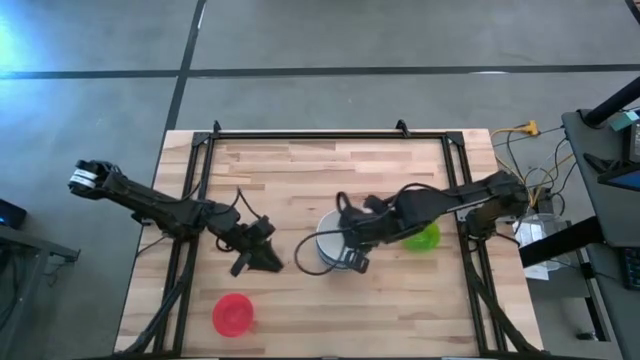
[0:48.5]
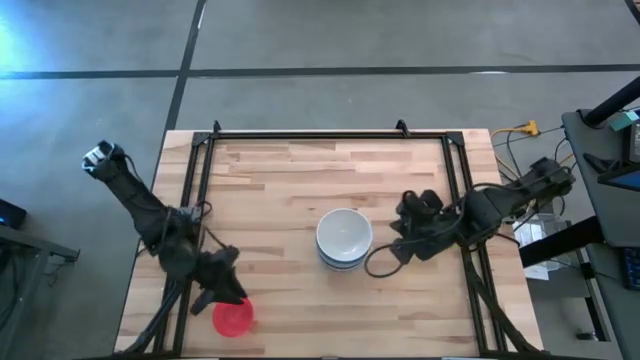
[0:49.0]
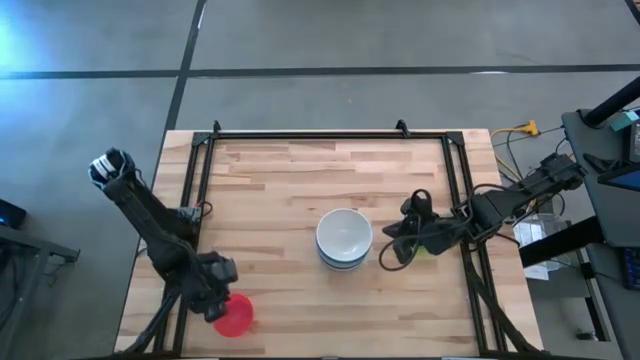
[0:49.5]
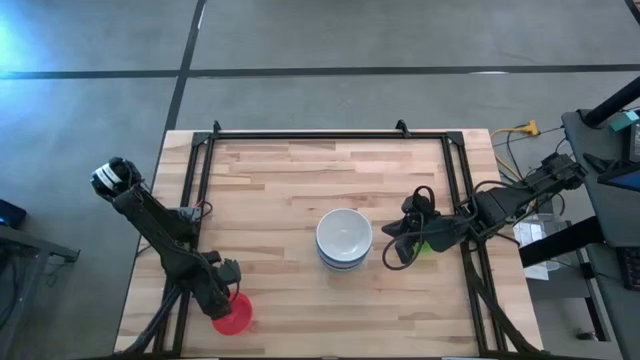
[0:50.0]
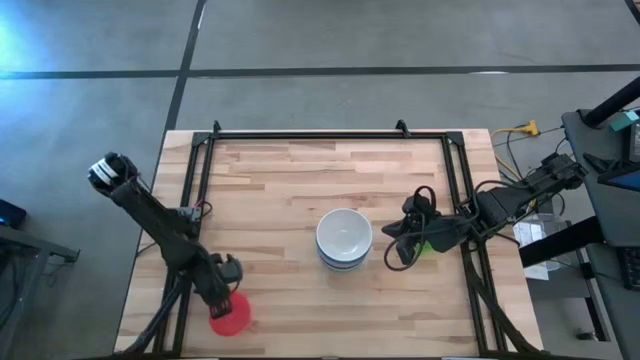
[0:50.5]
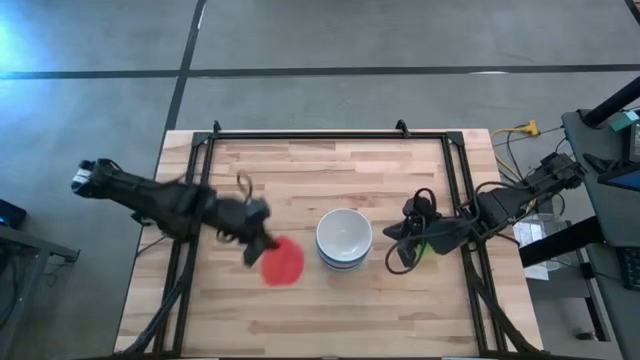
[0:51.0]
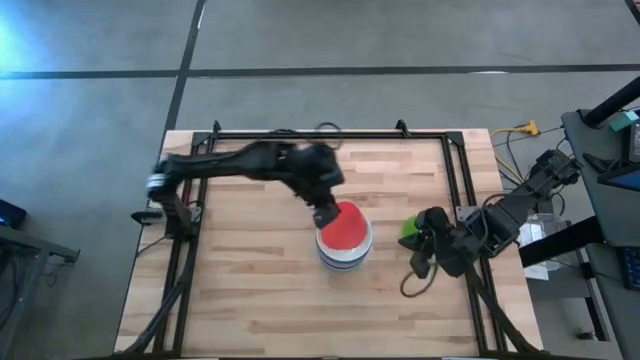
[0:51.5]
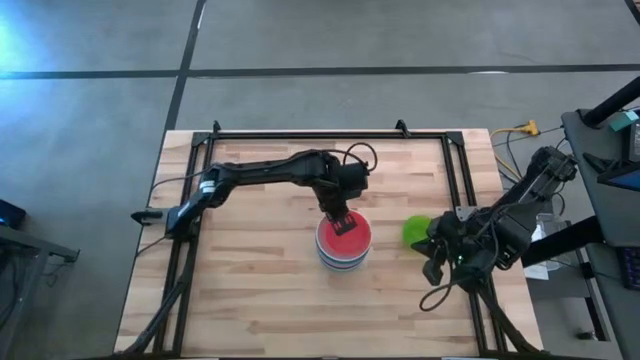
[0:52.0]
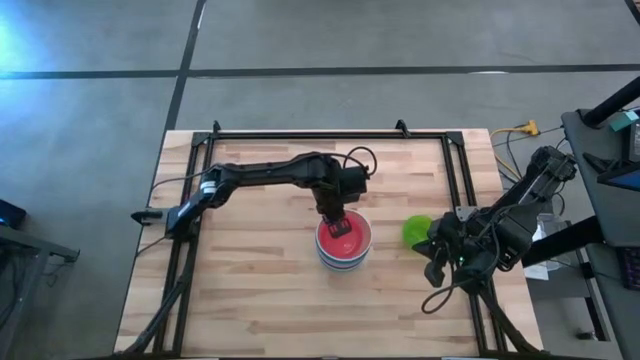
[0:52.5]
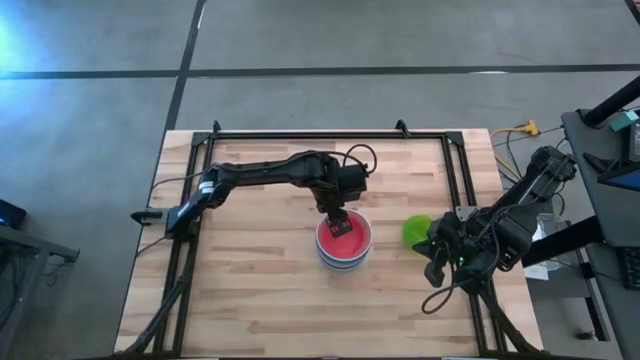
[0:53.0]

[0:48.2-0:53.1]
Task: Nest bowls inside each other
Stack the red bowl on top of the white bowl

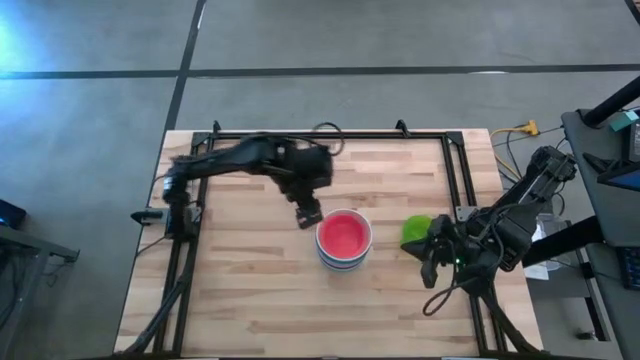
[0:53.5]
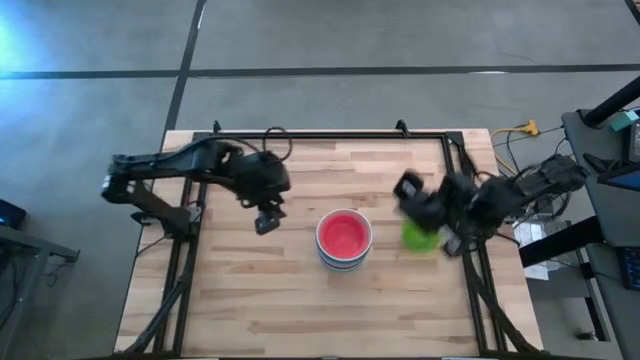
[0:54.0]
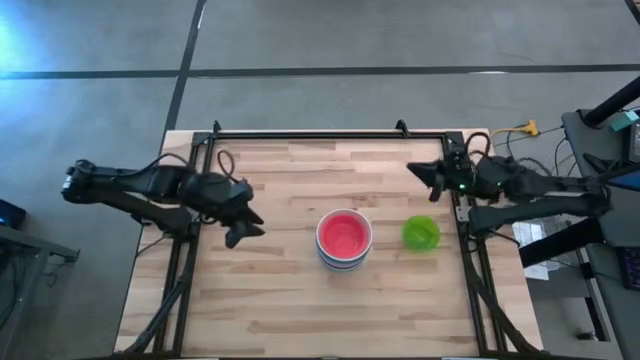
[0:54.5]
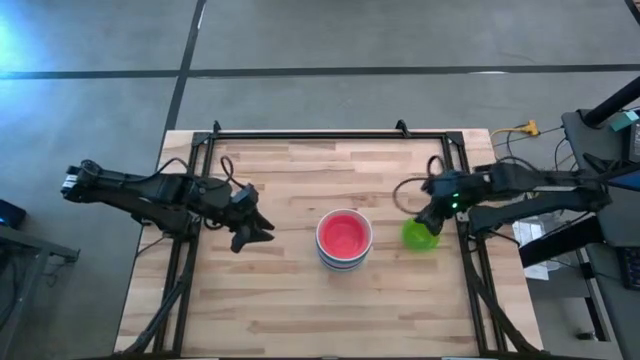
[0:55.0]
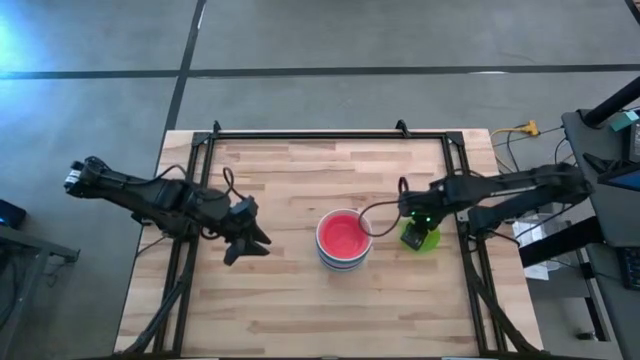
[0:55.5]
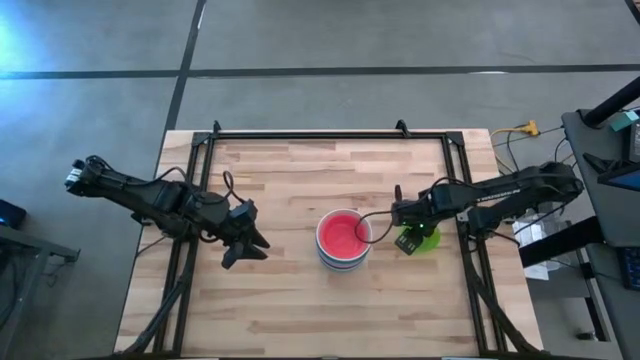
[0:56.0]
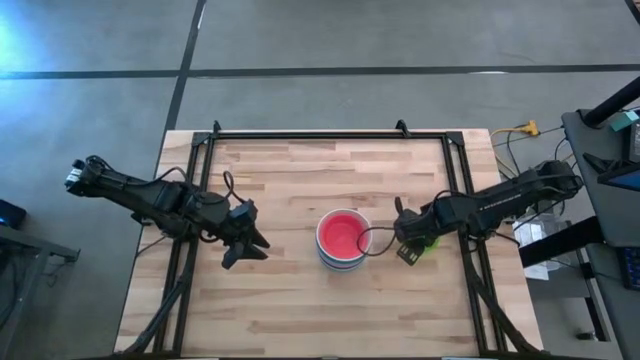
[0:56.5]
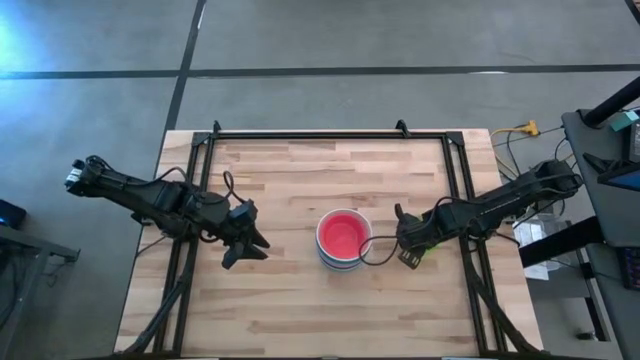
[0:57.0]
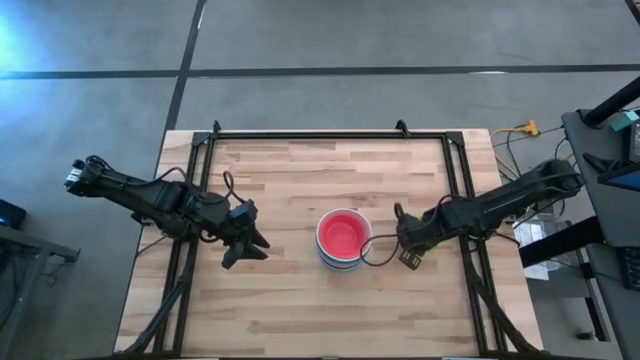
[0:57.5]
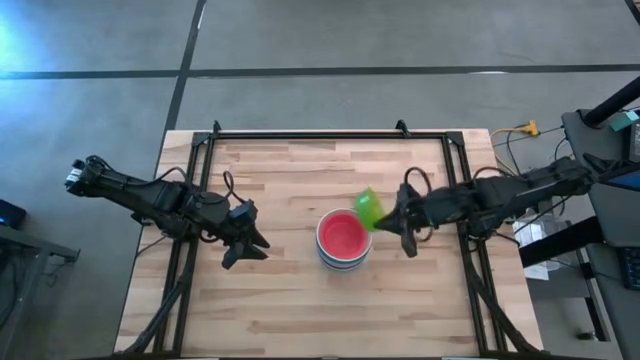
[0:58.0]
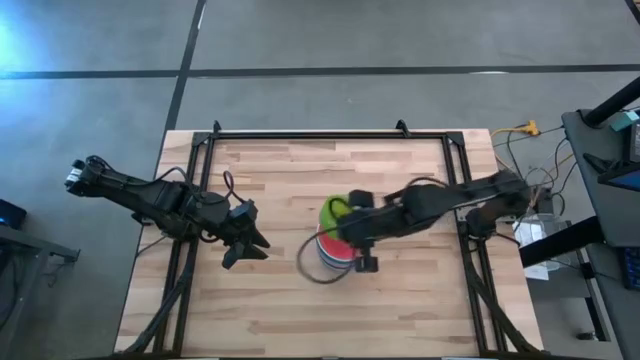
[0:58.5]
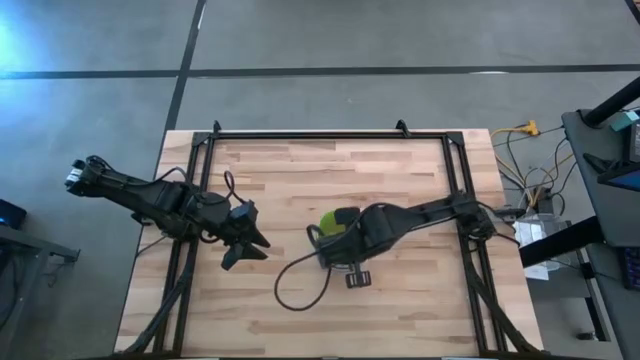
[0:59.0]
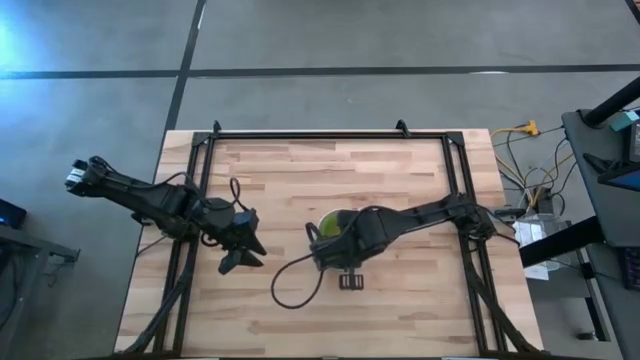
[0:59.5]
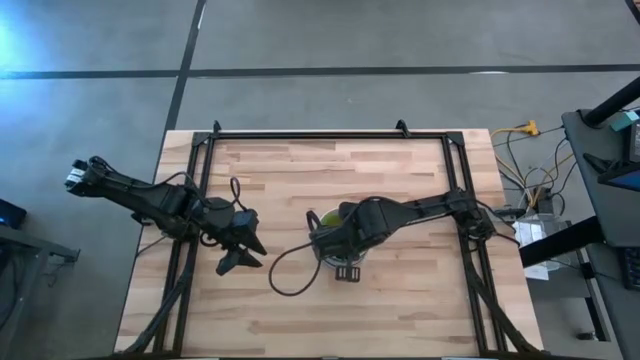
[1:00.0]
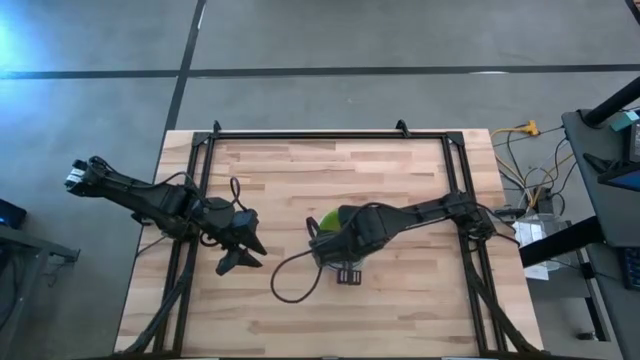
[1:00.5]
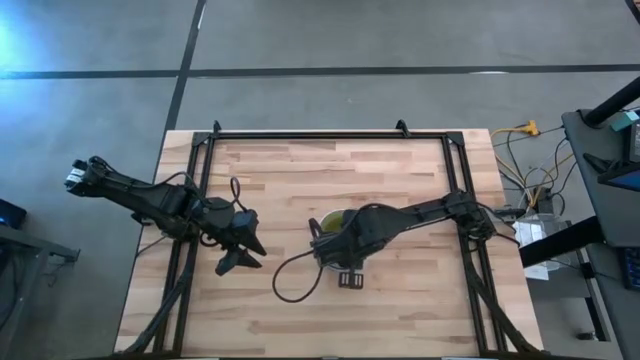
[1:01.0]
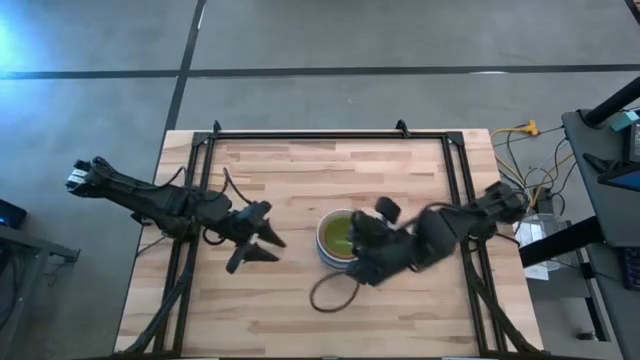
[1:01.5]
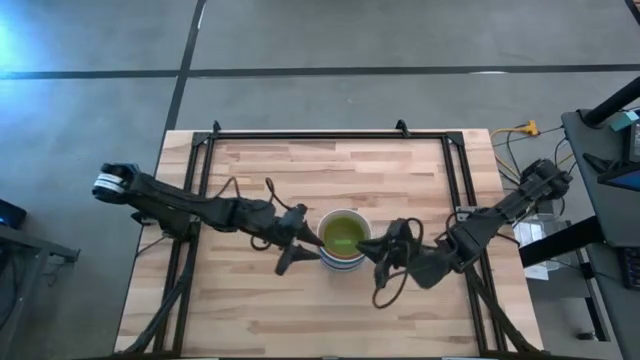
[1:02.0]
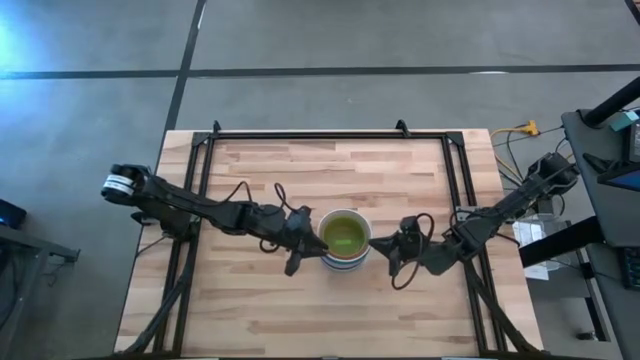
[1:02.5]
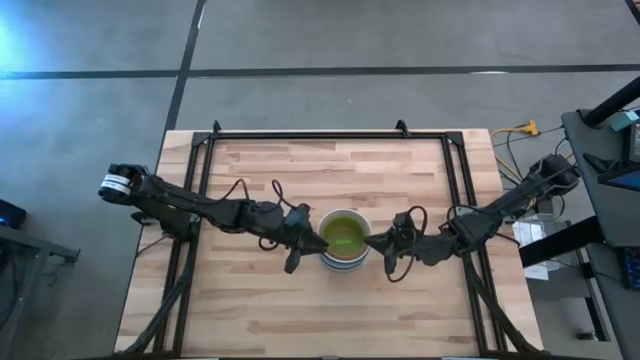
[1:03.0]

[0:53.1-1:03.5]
Stack the green bowl on top of the red bowl

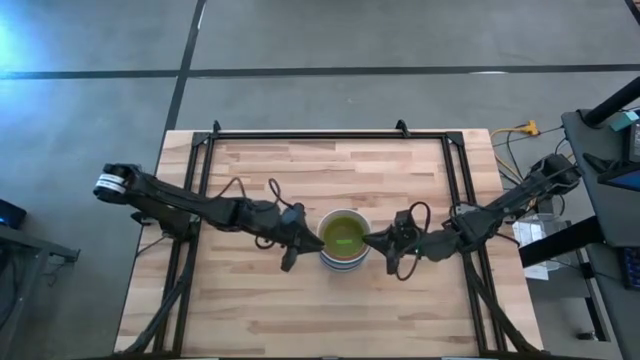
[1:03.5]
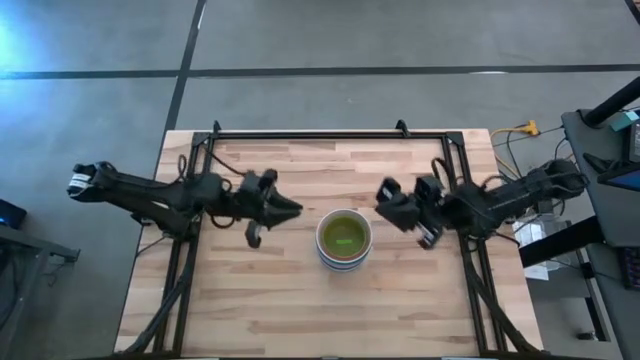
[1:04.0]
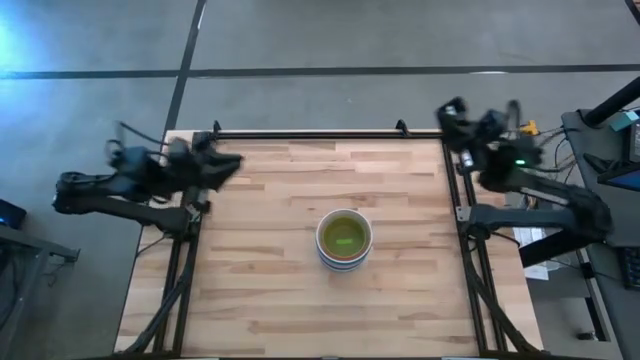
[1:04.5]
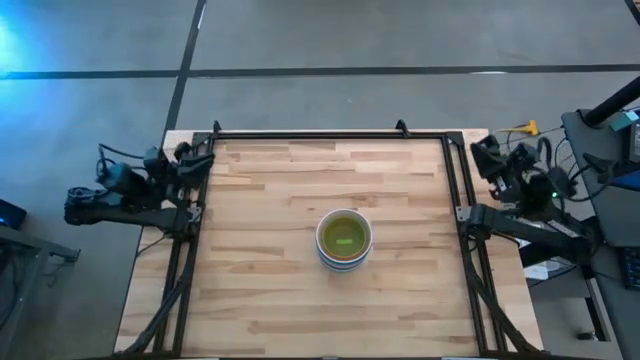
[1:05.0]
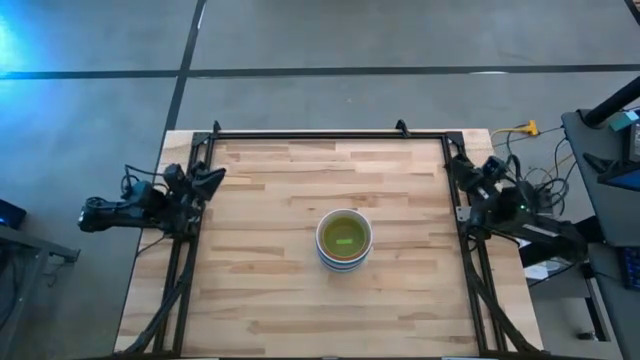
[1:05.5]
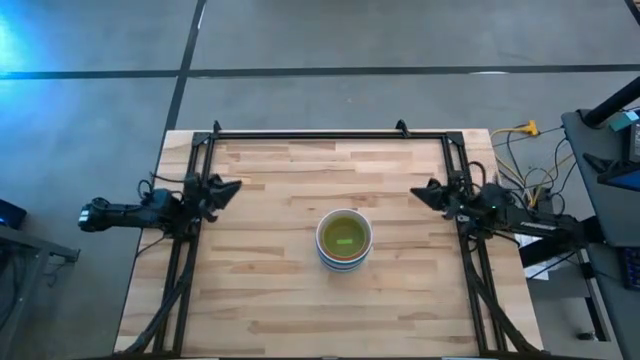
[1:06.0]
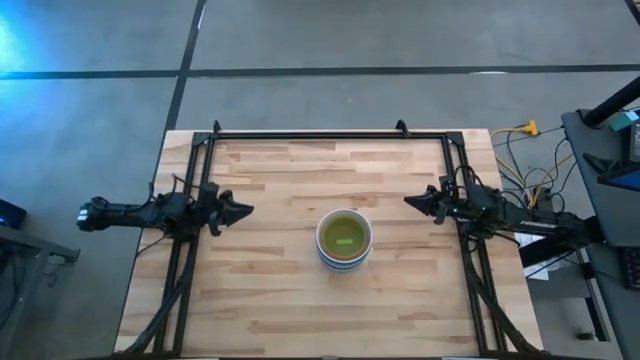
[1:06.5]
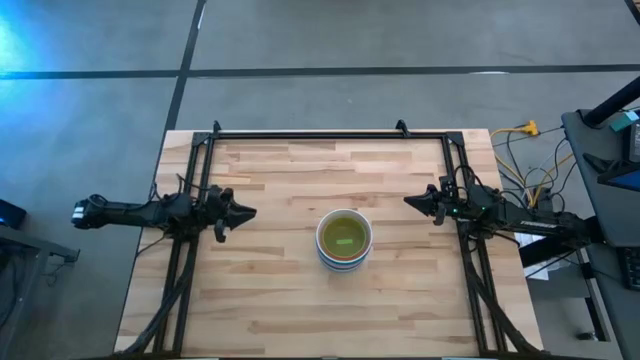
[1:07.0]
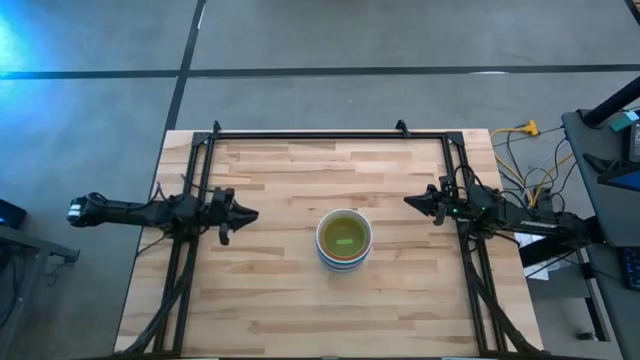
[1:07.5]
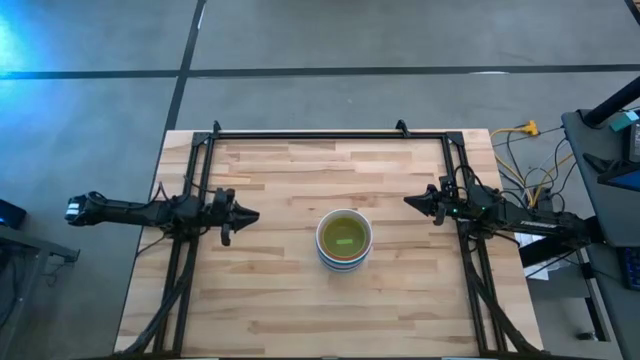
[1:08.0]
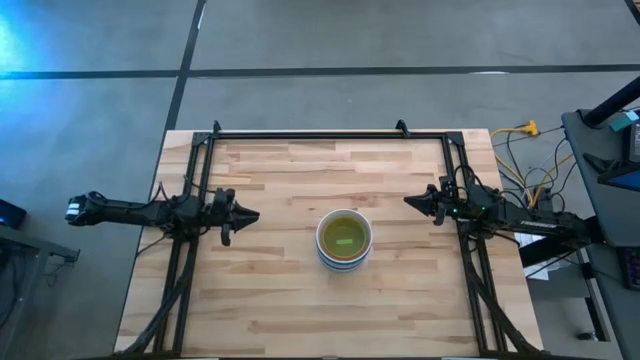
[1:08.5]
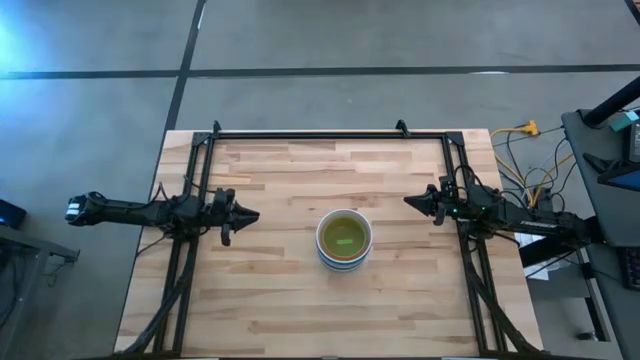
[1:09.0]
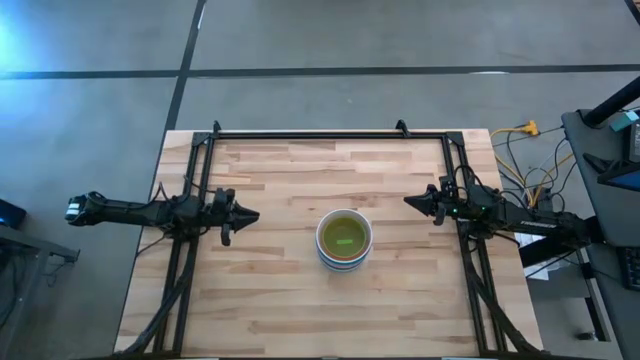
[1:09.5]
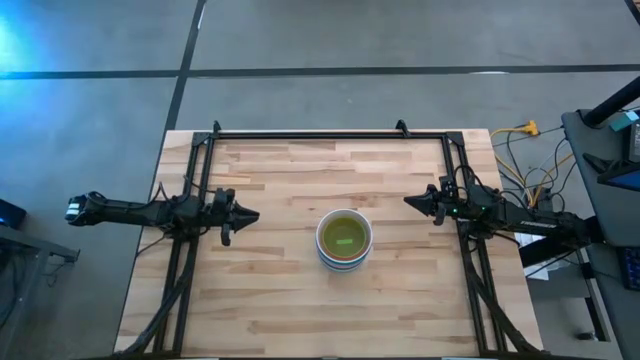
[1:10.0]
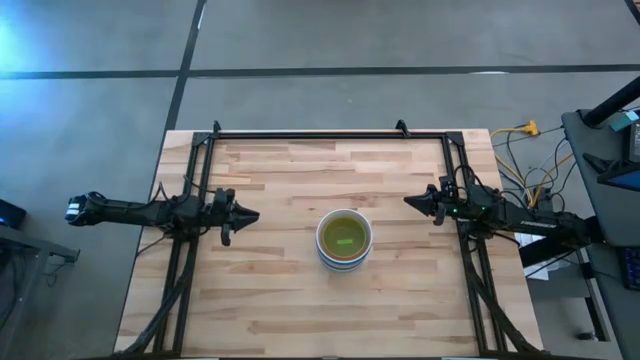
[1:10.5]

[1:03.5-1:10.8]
Return to Home Position
